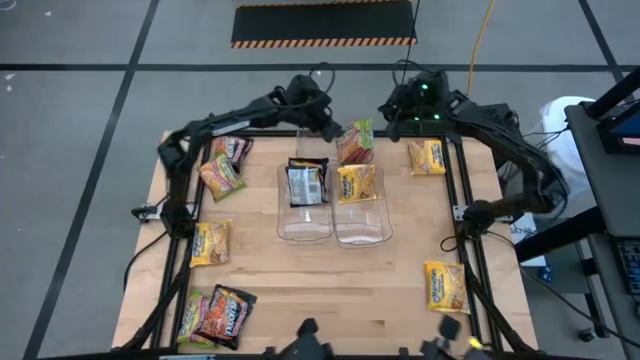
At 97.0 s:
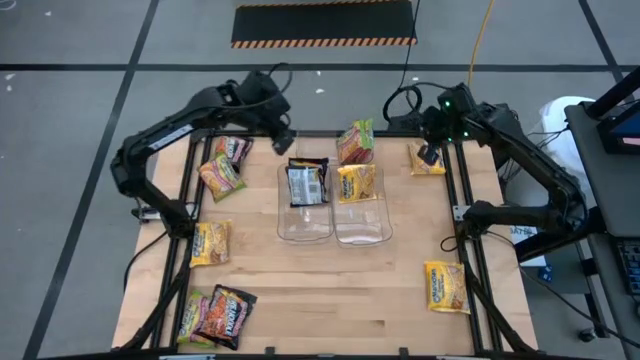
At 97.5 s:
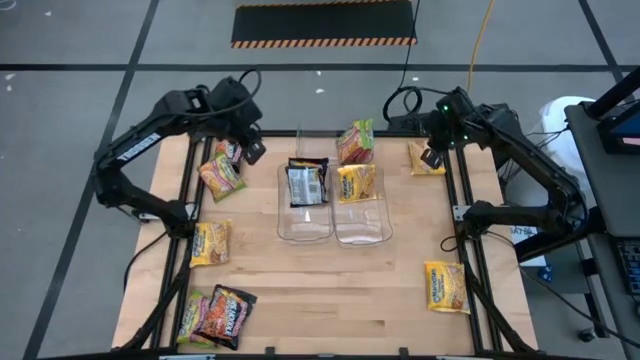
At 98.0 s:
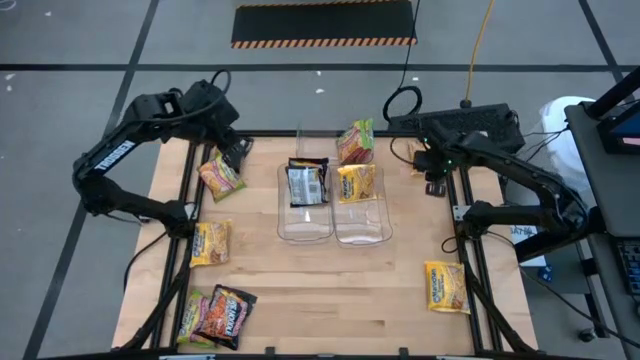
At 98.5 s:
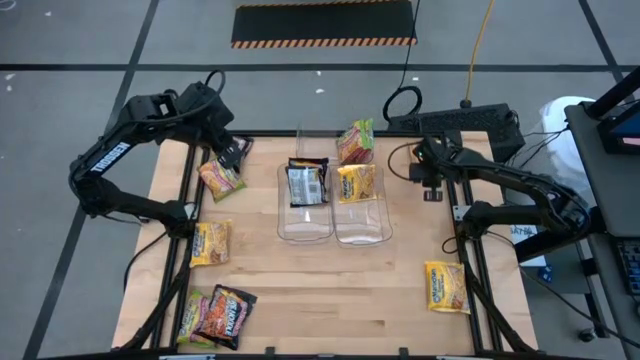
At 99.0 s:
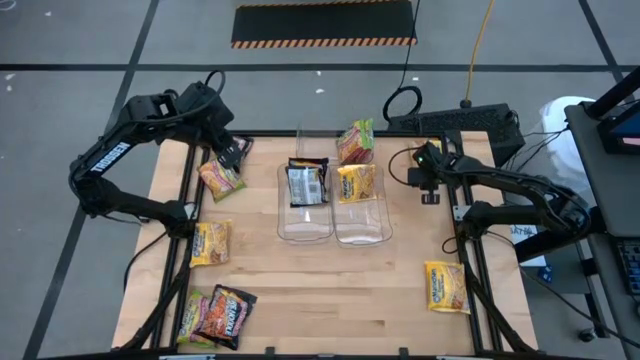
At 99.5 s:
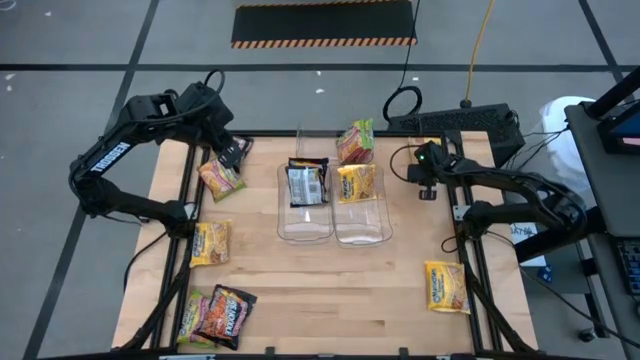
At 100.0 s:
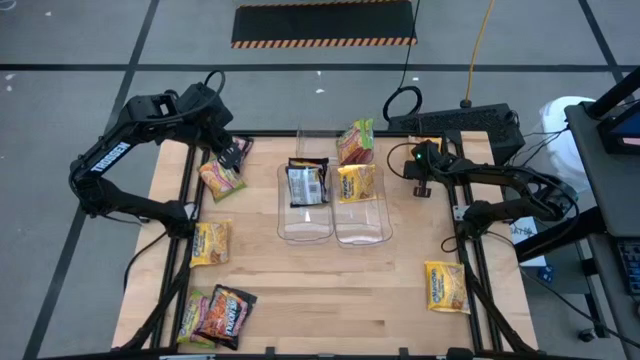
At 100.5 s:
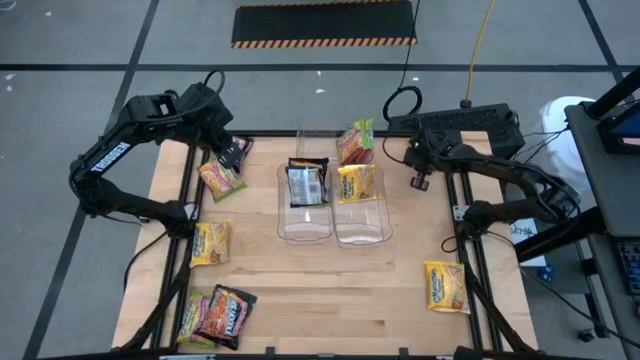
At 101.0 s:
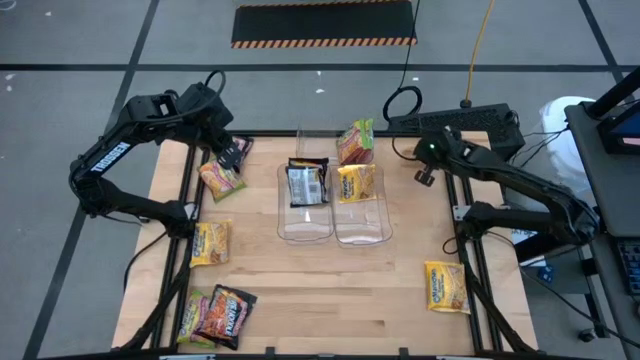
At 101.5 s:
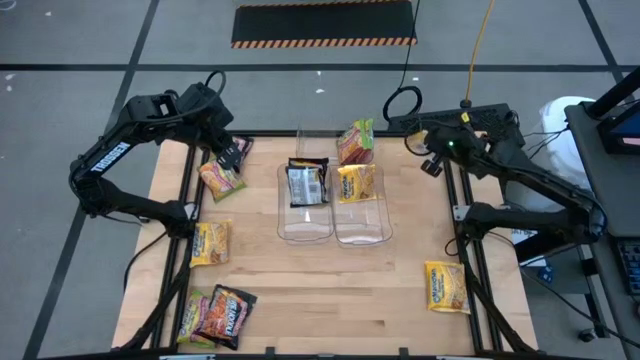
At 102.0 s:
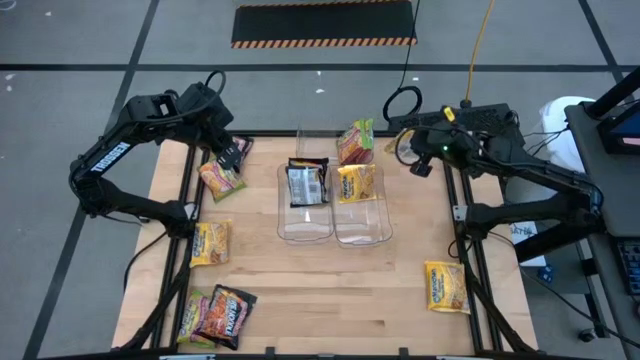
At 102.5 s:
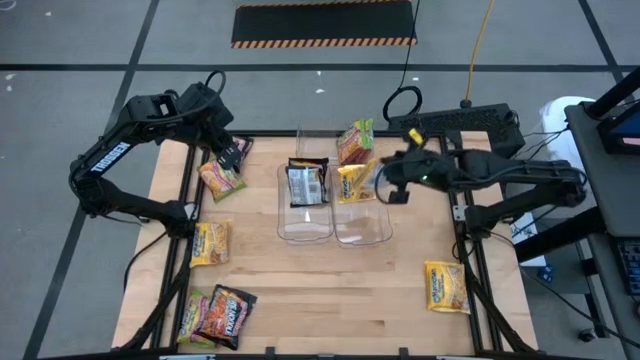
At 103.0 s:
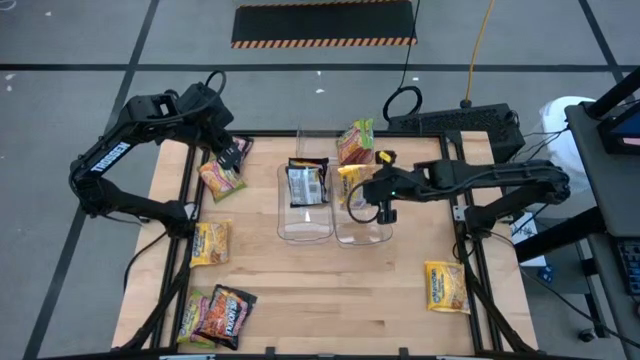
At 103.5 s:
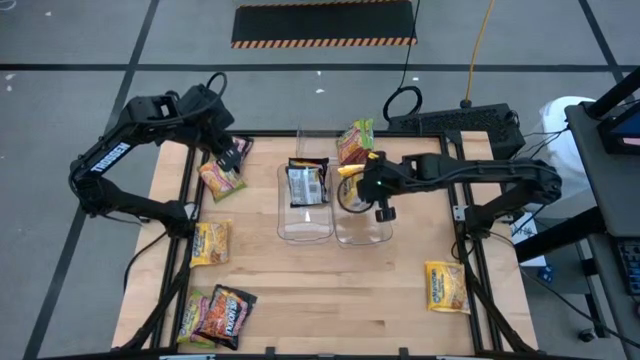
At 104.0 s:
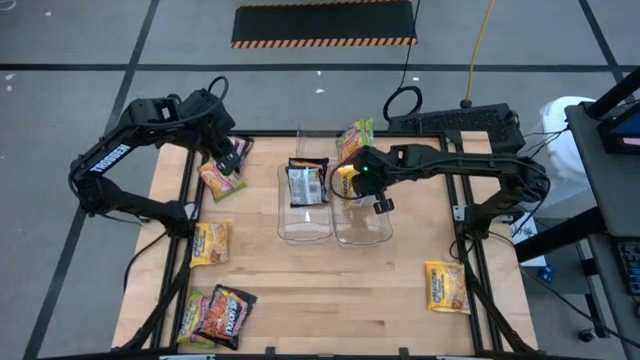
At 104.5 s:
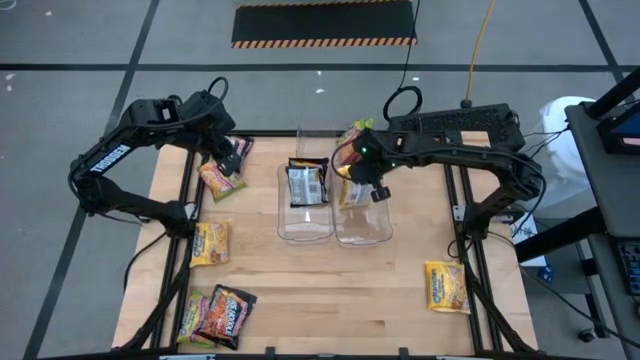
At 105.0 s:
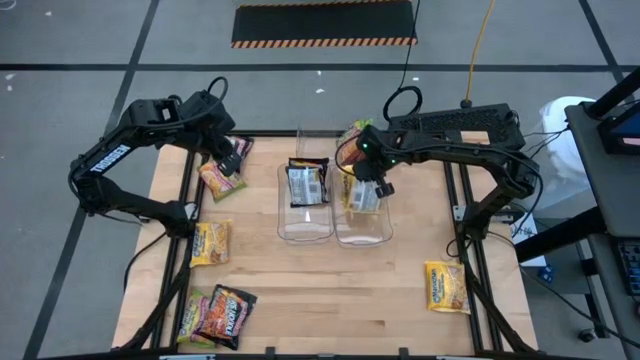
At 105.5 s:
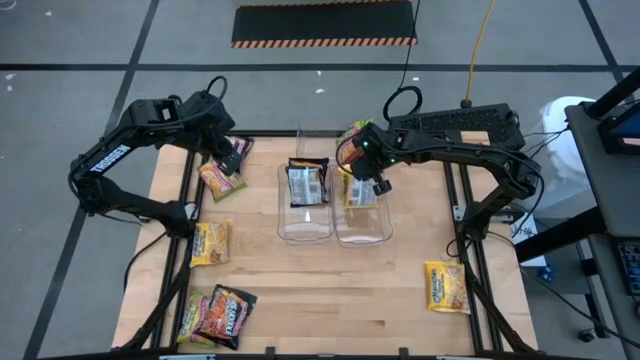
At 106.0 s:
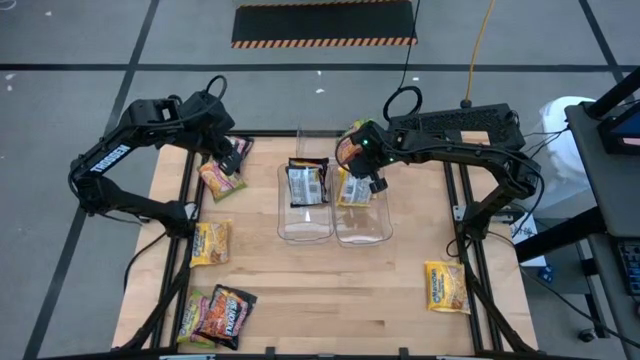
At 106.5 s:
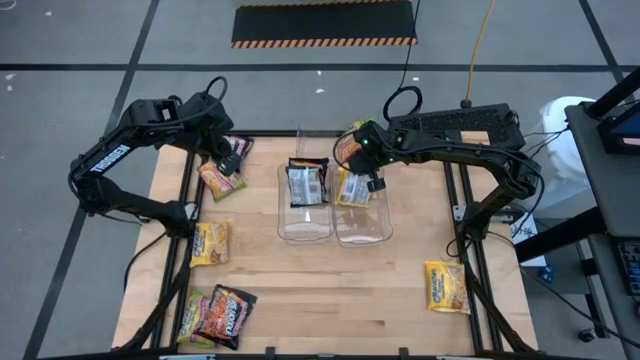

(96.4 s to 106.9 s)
Task: Sort Maruchan noodles
Put the yellow noodle pack into the right transparent bin

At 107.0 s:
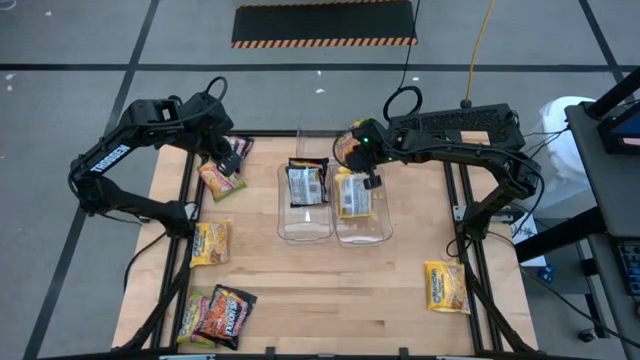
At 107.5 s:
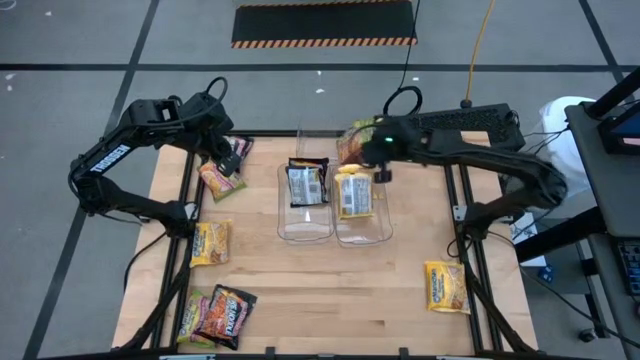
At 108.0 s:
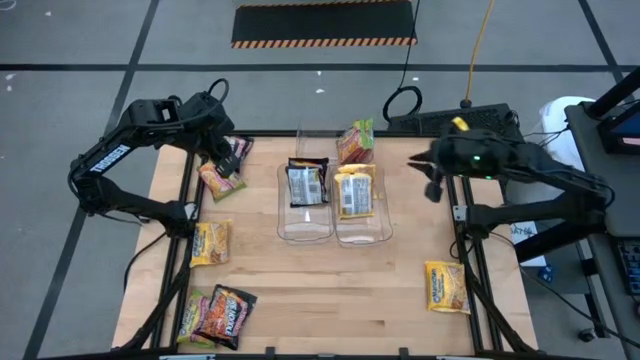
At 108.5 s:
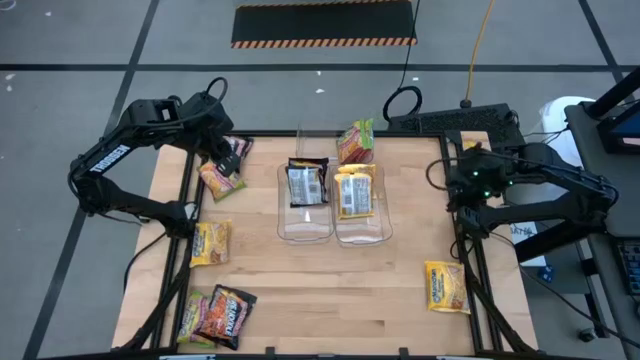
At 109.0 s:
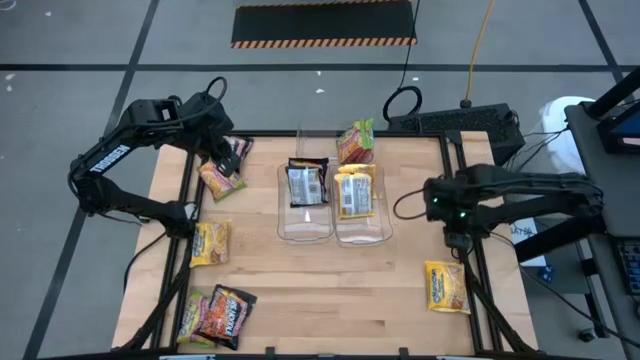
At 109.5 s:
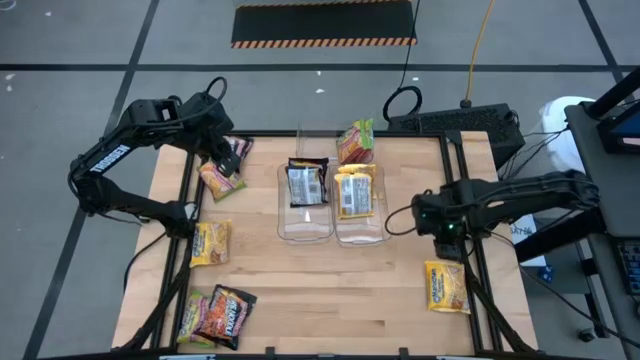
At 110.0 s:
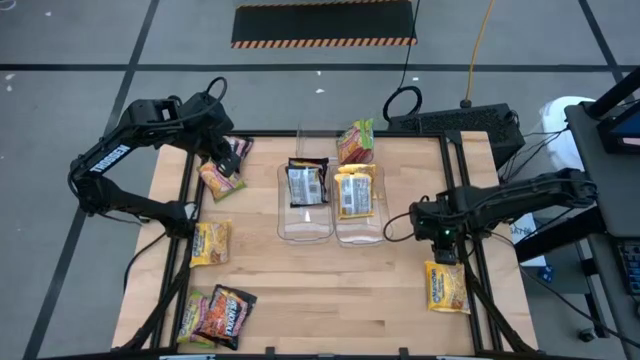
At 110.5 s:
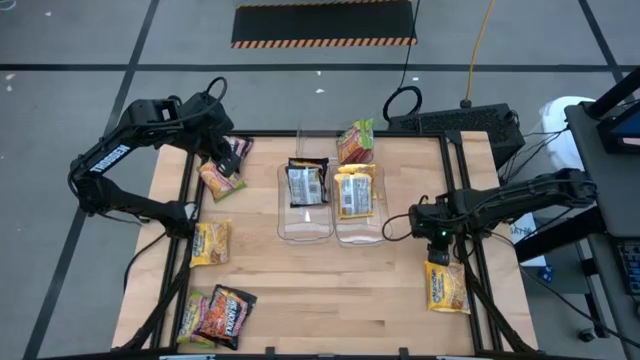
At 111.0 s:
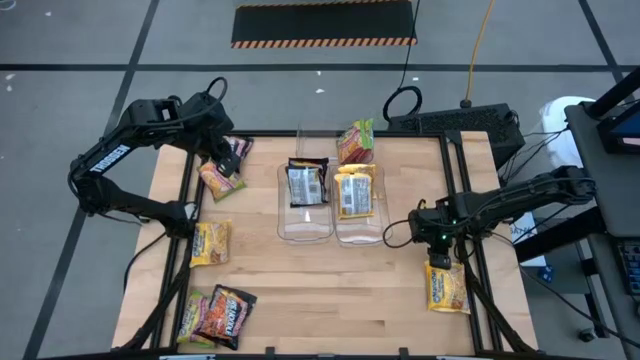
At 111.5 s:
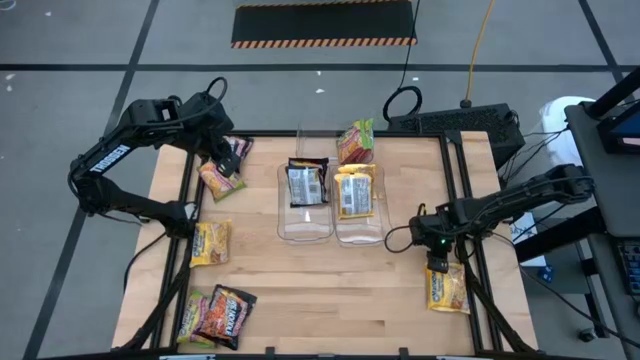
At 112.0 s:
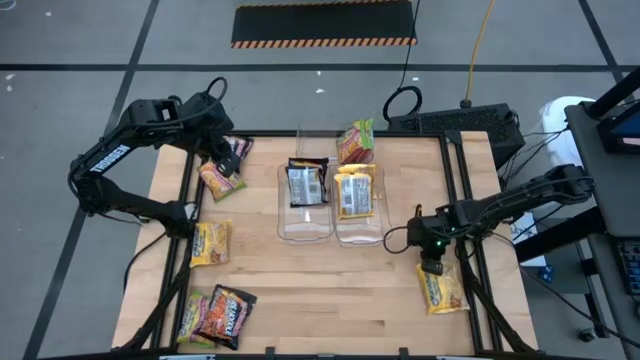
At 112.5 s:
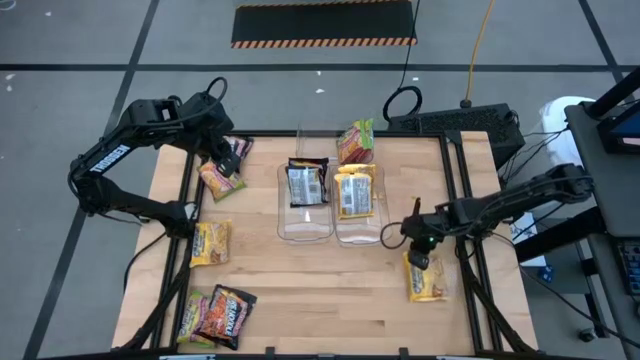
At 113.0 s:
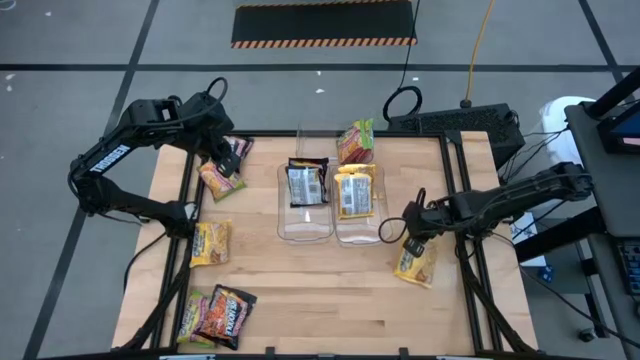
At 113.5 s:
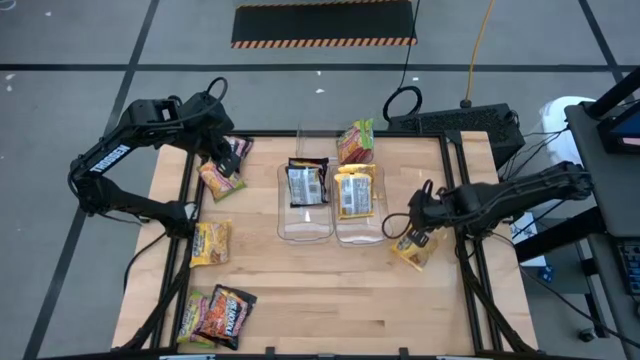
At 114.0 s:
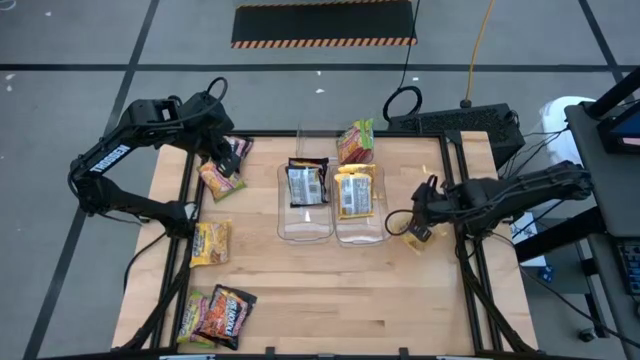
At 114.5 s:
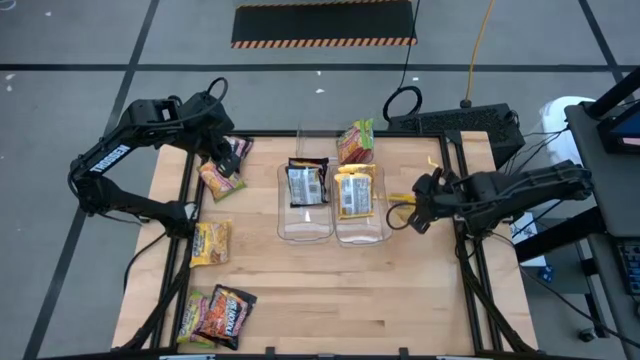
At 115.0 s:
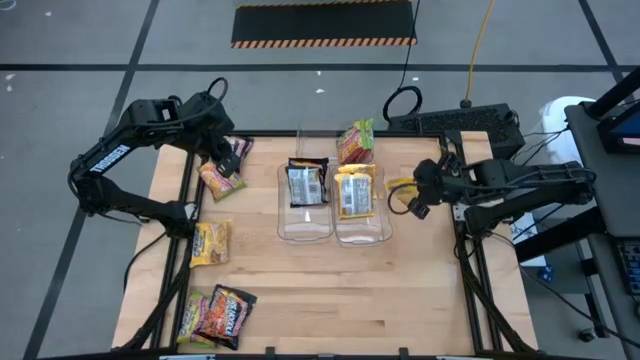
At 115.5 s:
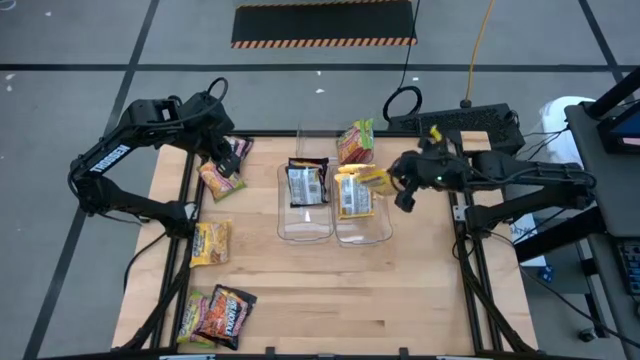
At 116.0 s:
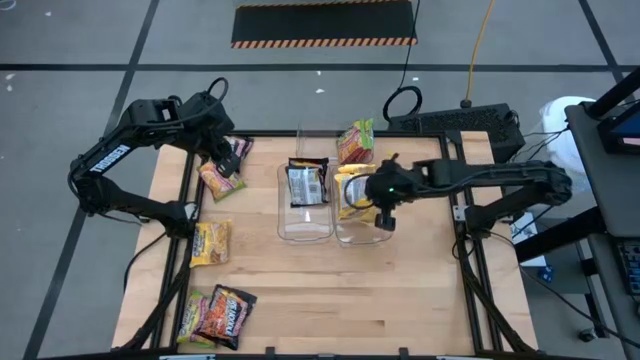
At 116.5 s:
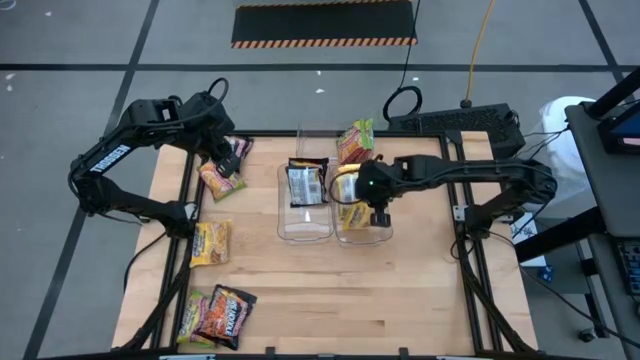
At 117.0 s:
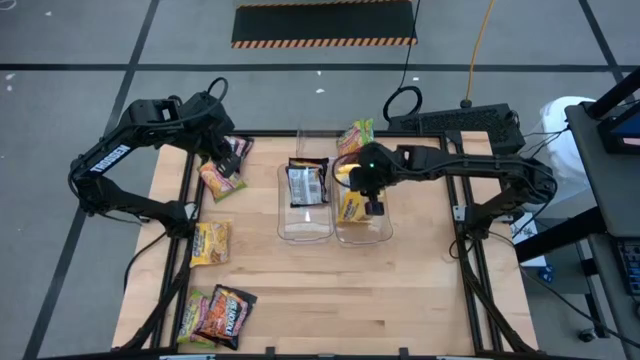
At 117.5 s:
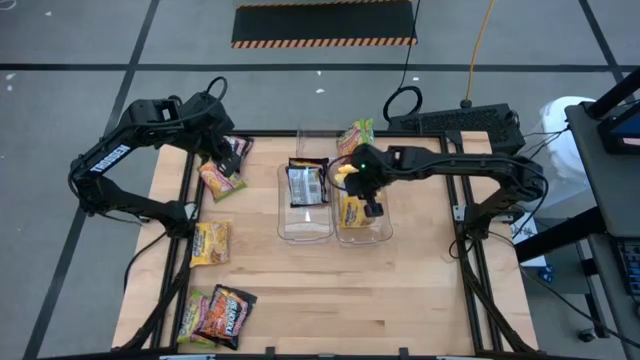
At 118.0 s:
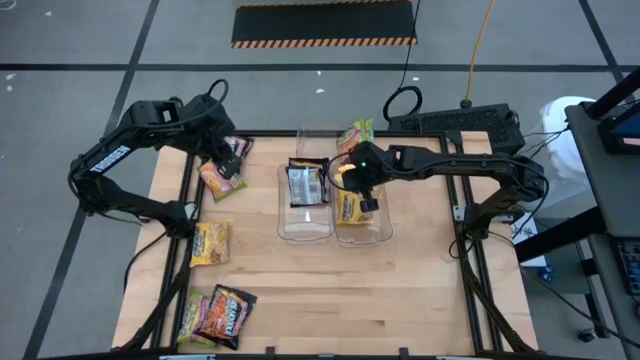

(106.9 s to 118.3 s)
Put the yellow noodle pack into the right transparent bin
